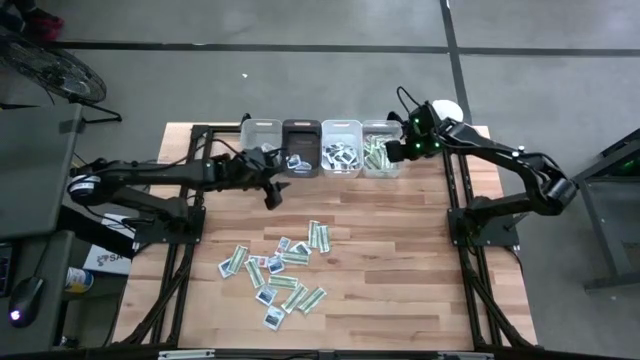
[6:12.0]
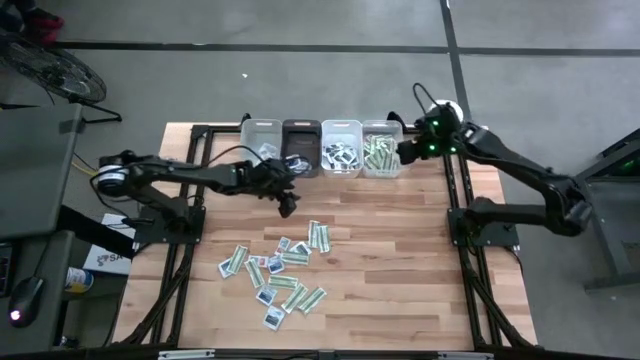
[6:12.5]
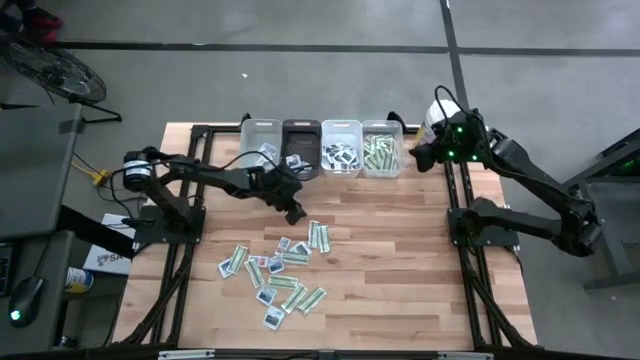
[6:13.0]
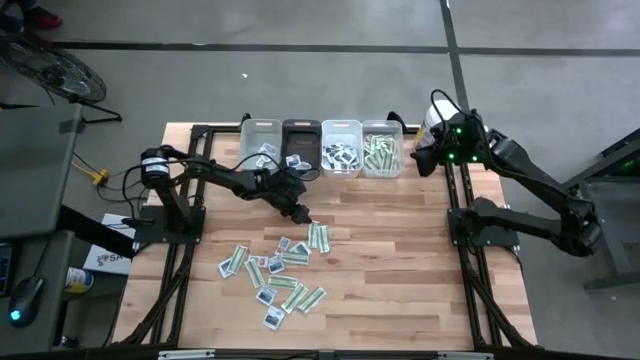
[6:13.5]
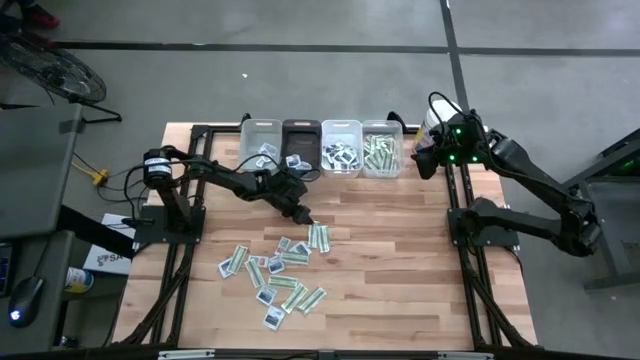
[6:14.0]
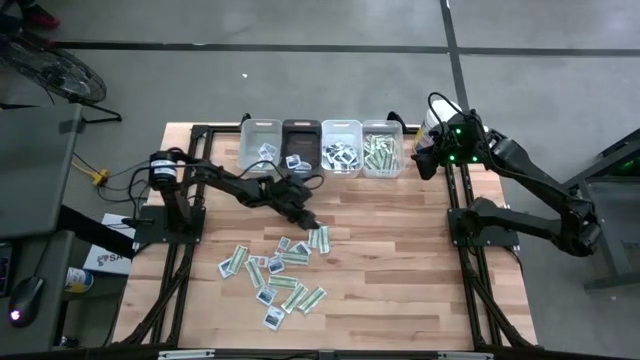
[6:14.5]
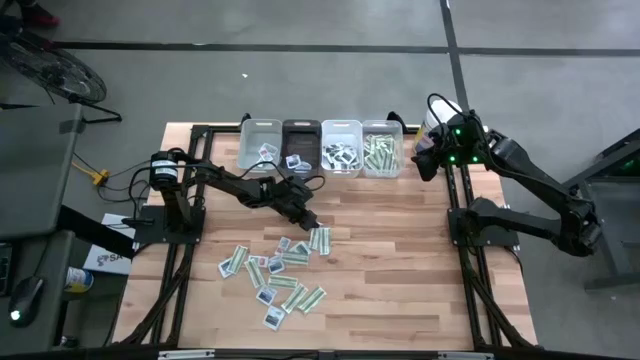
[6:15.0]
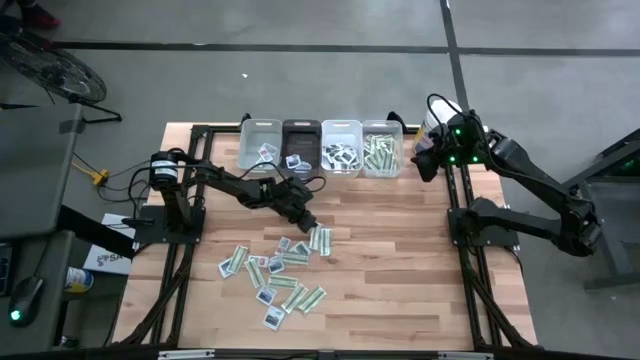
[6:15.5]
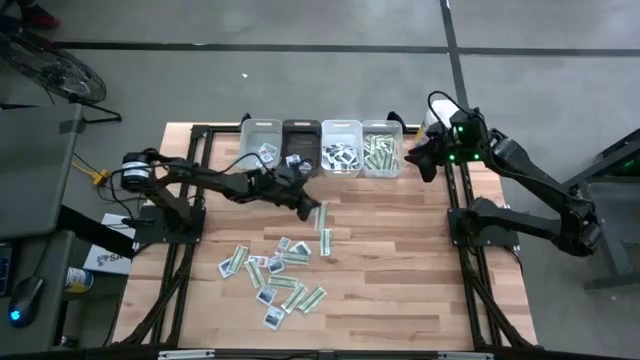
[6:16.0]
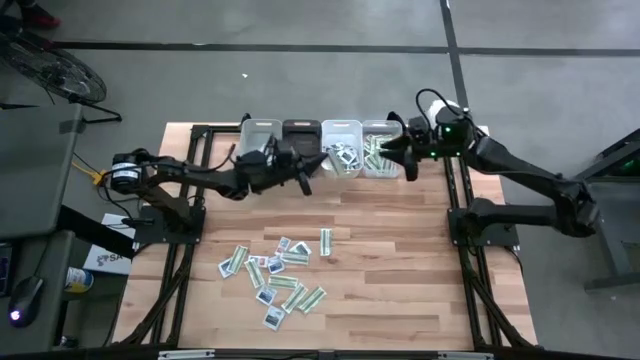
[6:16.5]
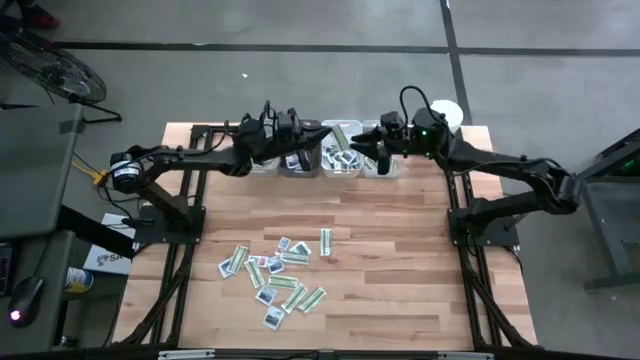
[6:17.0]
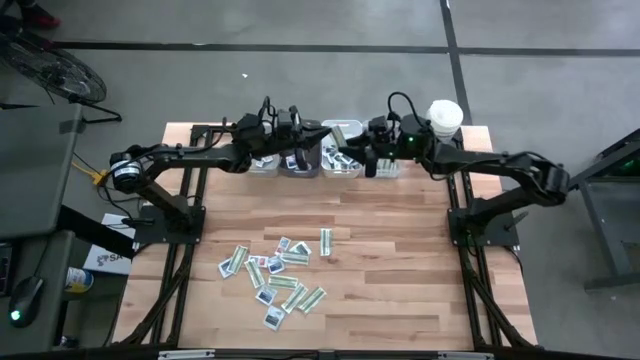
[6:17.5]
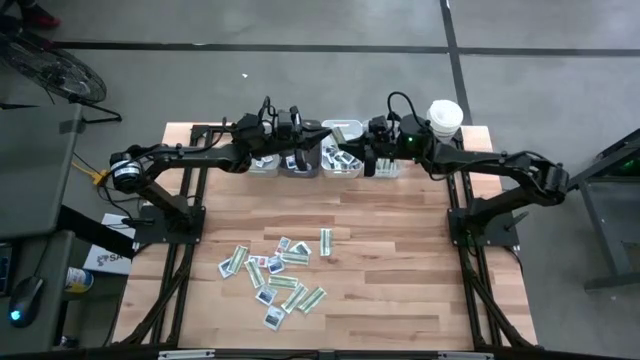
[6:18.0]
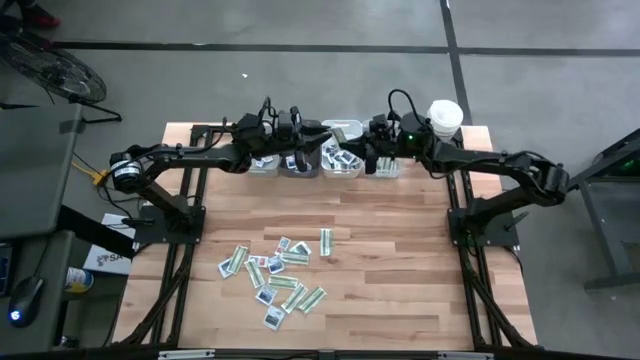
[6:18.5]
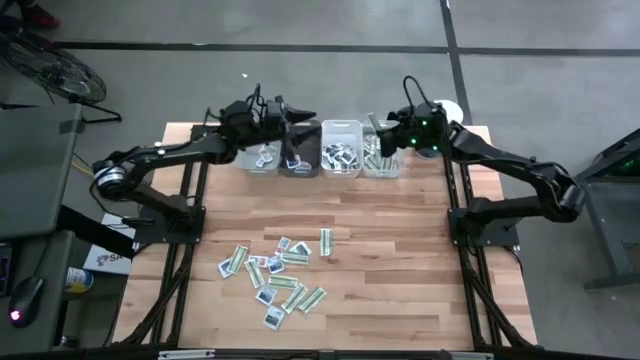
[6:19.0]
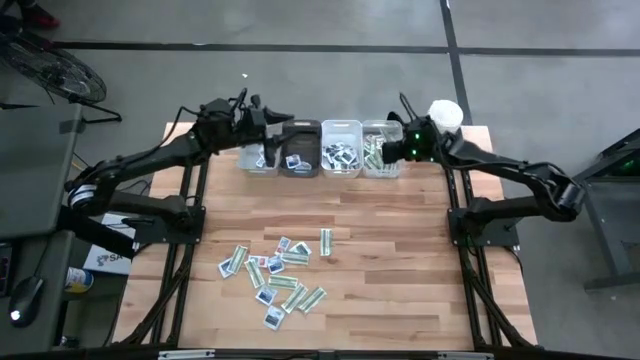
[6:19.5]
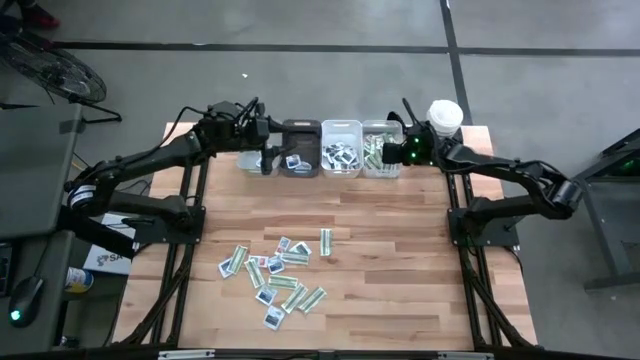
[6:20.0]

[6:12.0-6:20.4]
Task: Pick & Place First Aid Supplies
Put the green bandage into the transparent bin

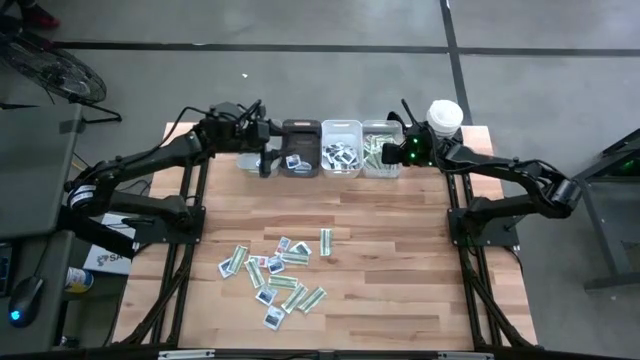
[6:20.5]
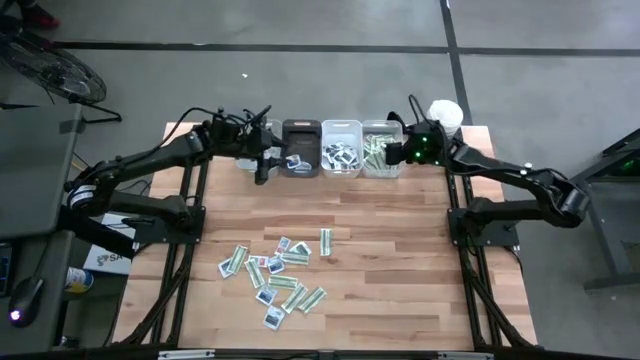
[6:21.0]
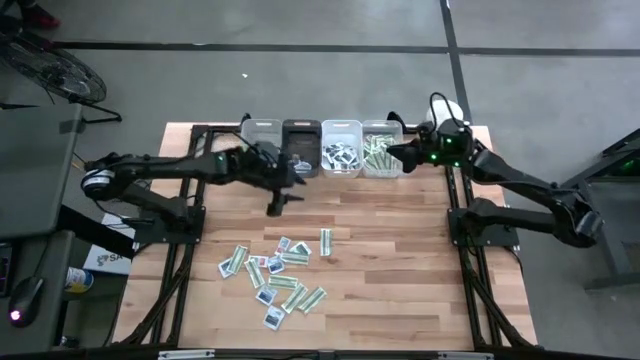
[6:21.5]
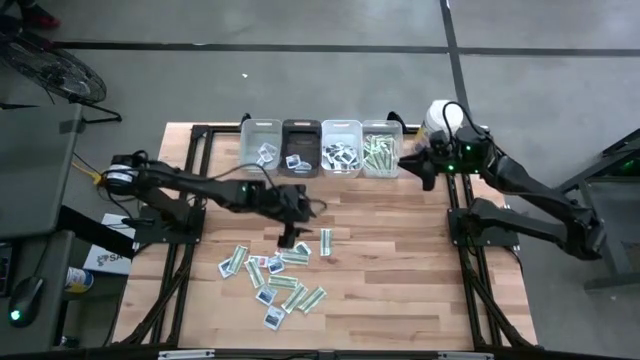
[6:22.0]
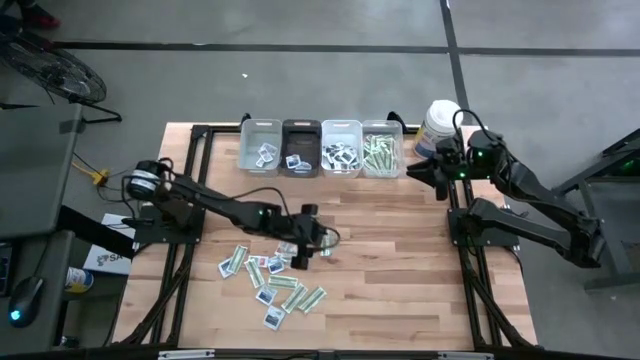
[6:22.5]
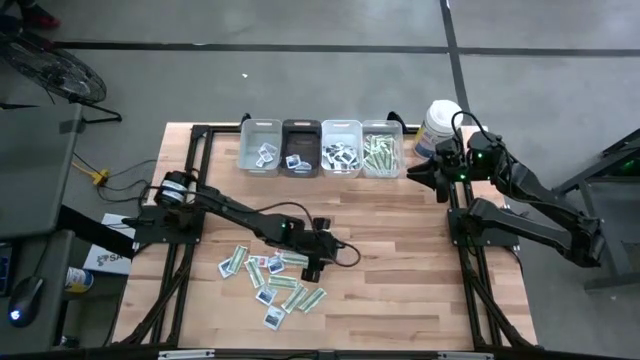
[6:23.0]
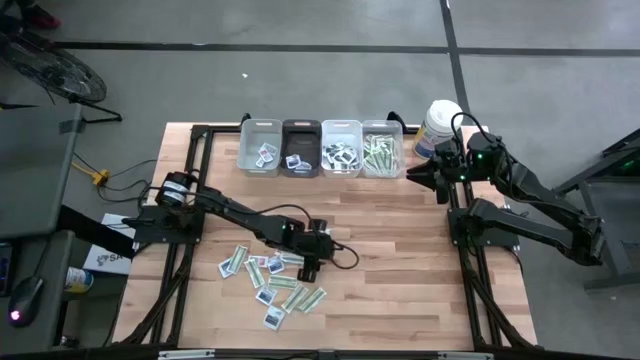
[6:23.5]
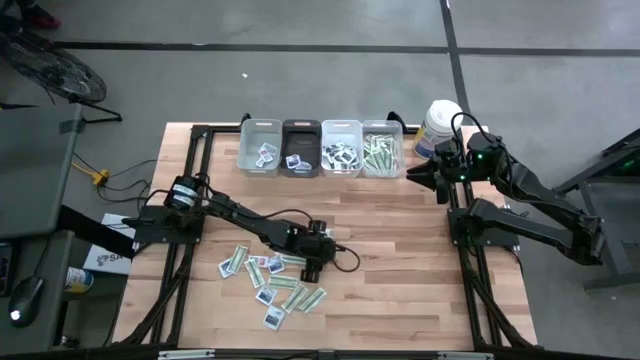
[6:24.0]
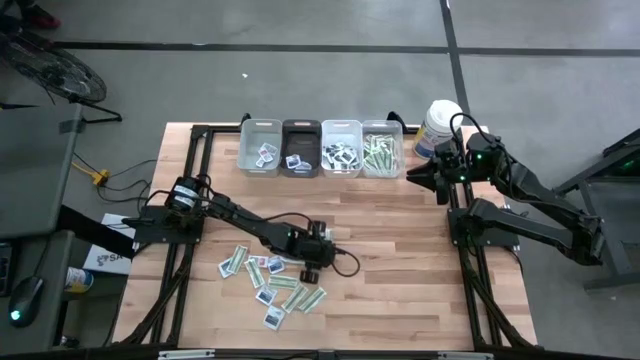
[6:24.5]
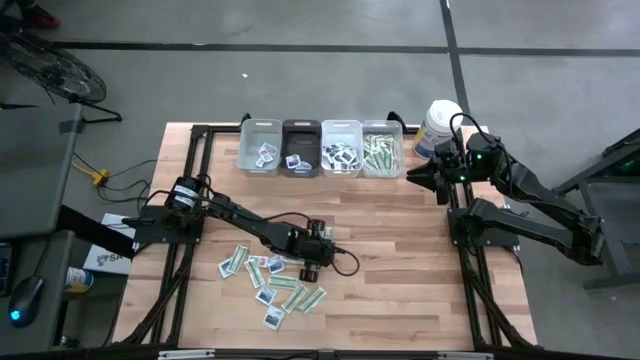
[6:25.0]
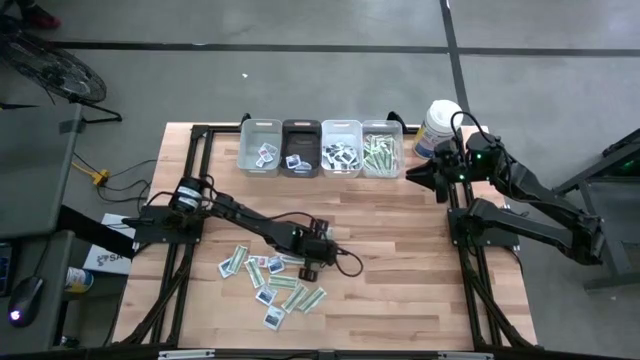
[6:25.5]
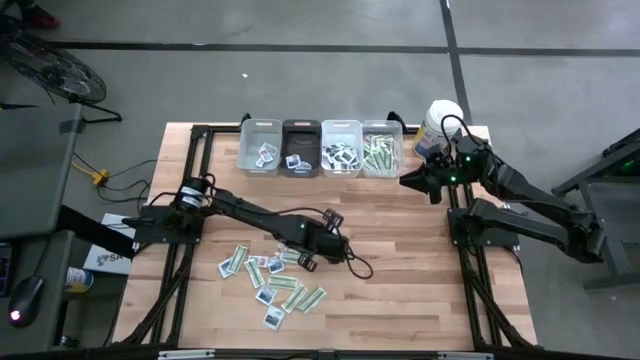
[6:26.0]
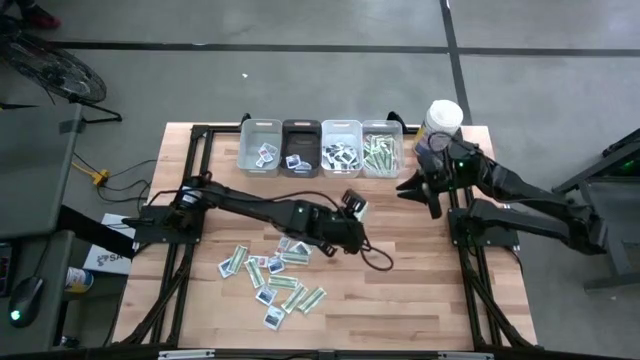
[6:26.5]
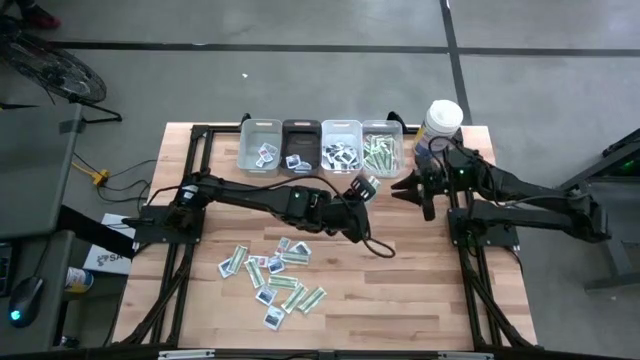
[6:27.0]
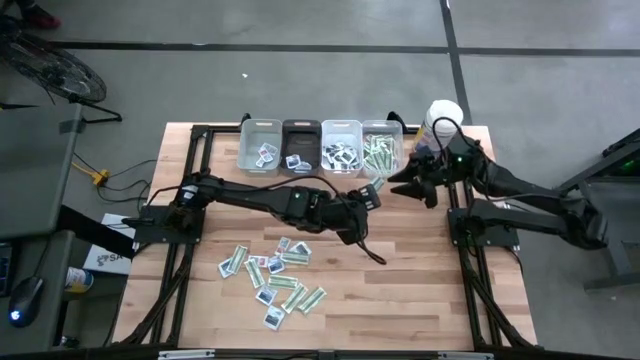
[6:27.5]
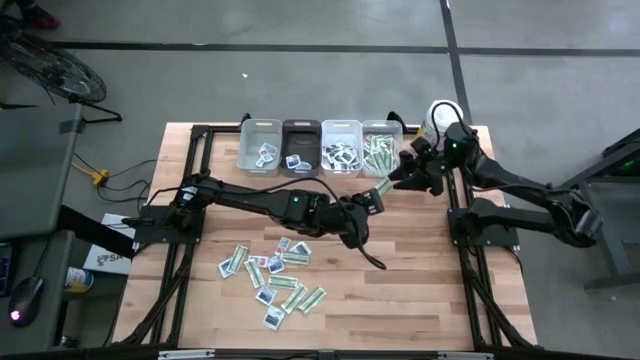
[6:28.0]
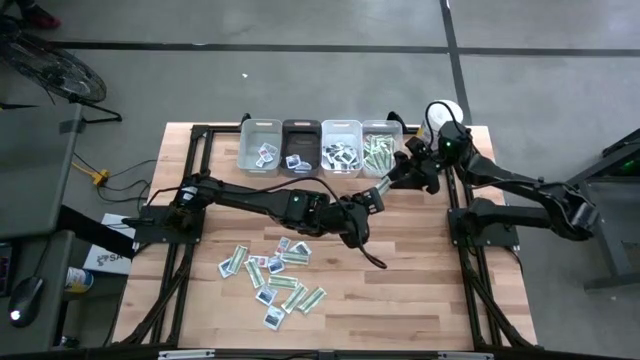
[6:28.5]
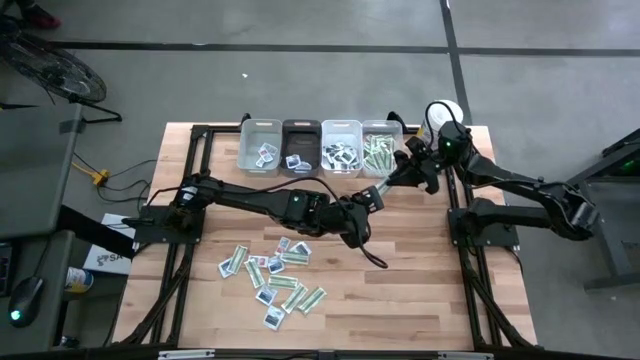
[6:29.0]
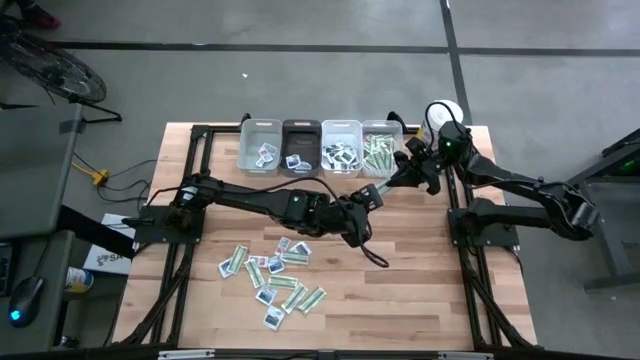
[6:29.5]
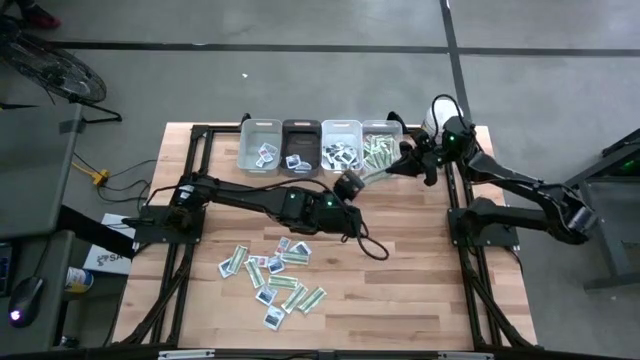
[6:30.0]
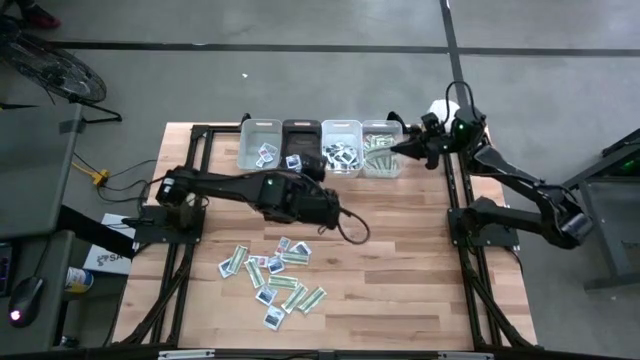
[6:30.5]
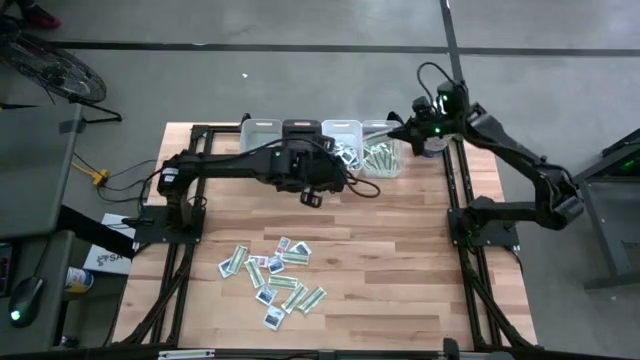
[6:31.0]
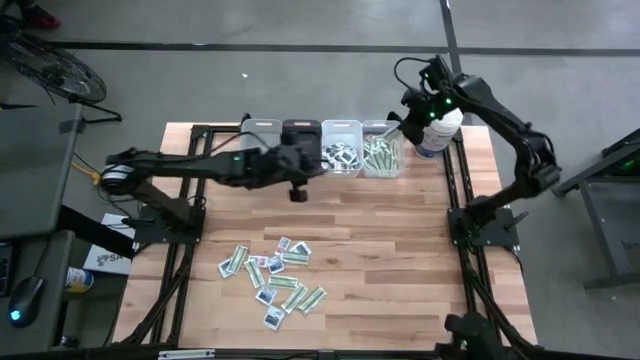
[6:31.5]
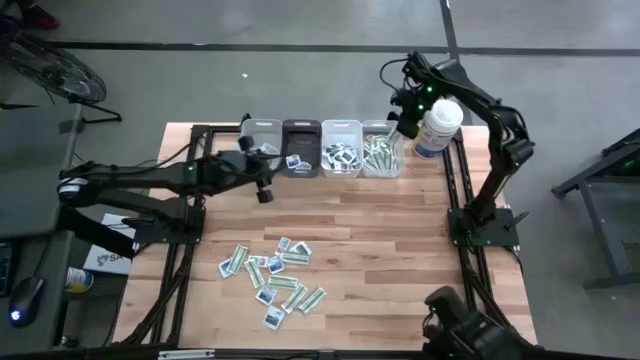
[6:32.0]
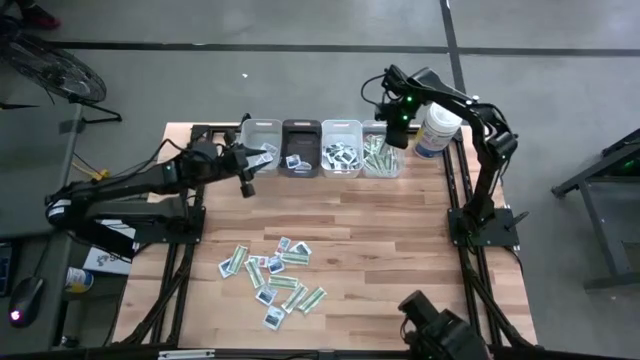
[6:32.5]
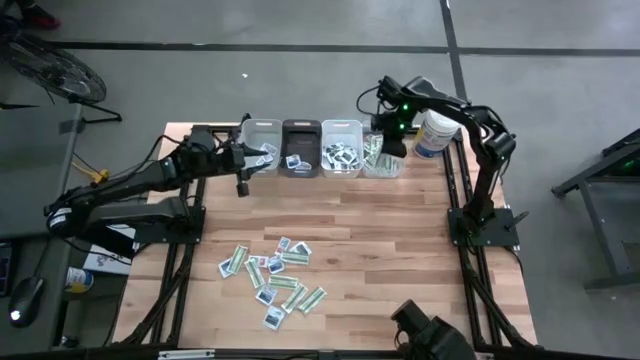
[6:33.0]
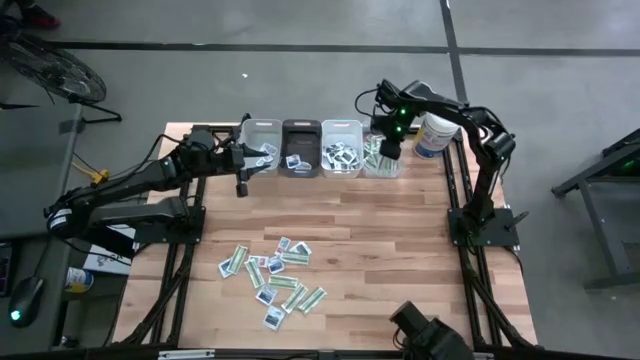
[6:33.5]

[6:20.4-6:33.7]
Put the green bandage into the transparent bin
